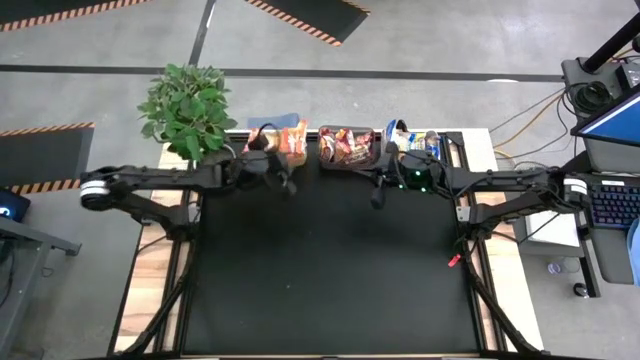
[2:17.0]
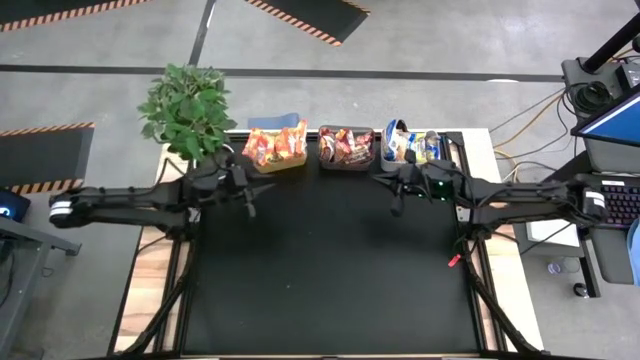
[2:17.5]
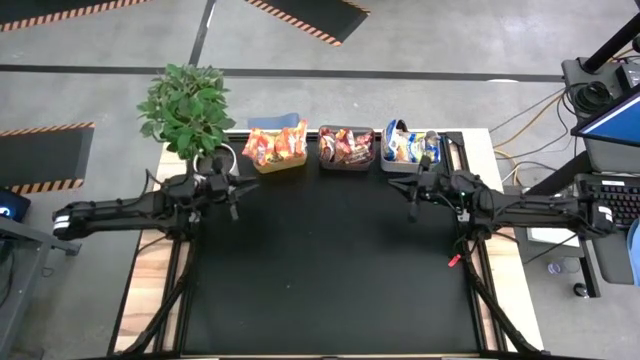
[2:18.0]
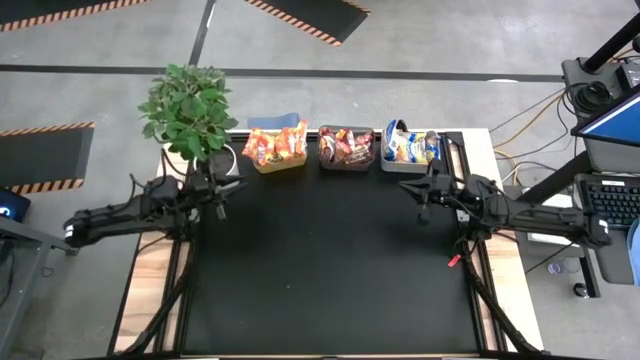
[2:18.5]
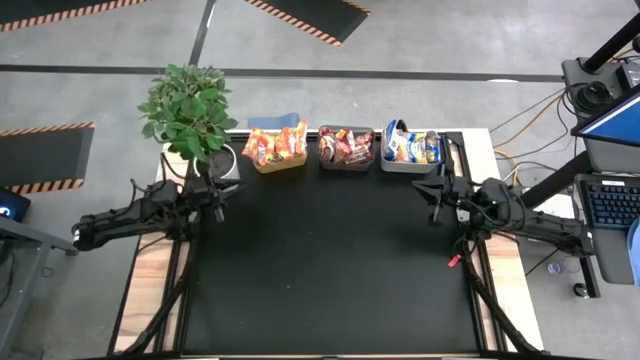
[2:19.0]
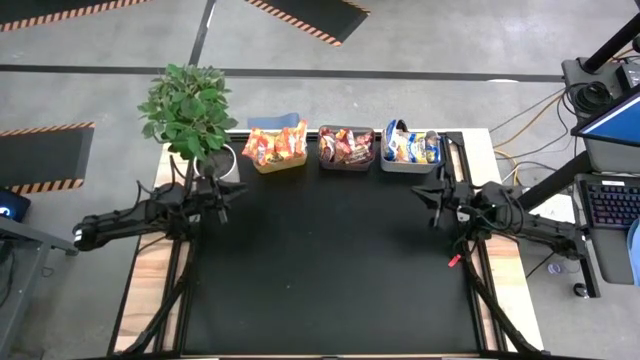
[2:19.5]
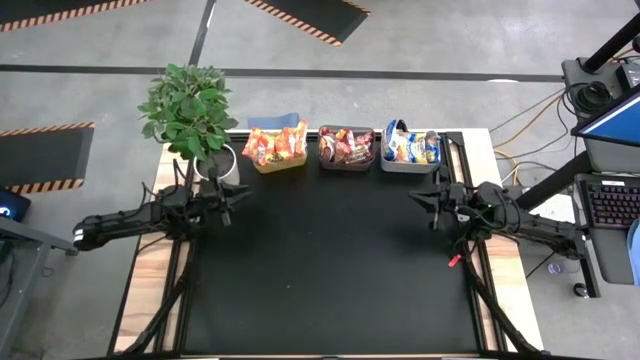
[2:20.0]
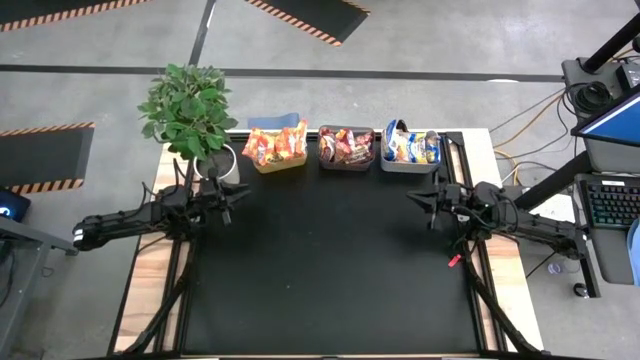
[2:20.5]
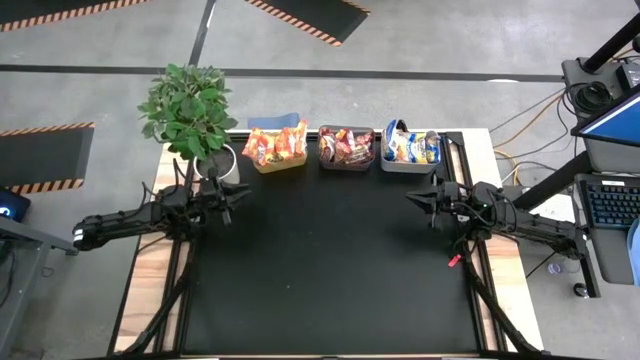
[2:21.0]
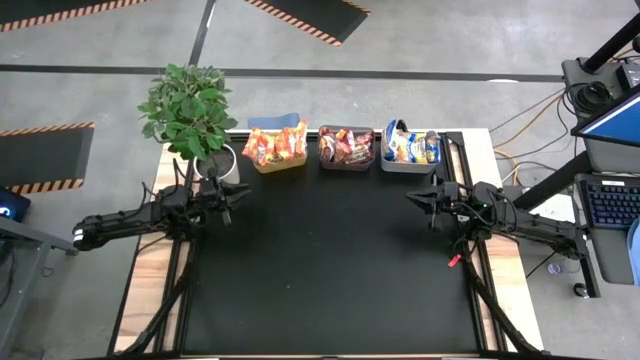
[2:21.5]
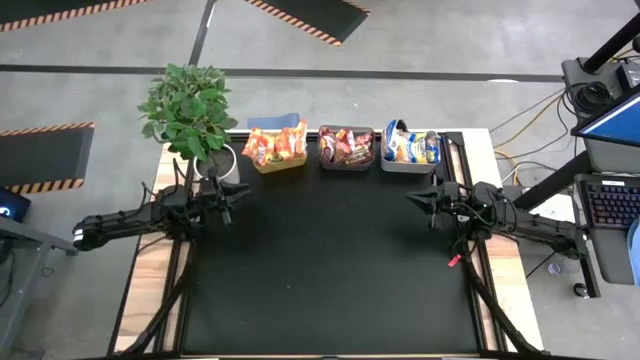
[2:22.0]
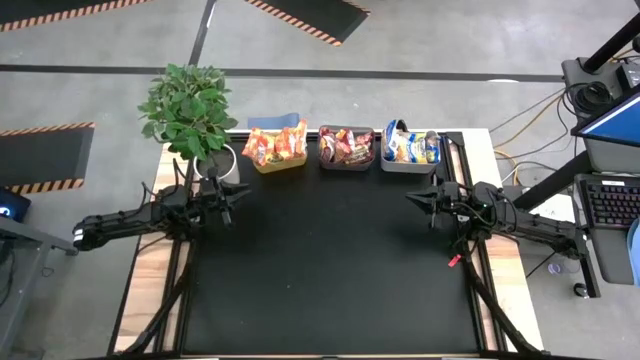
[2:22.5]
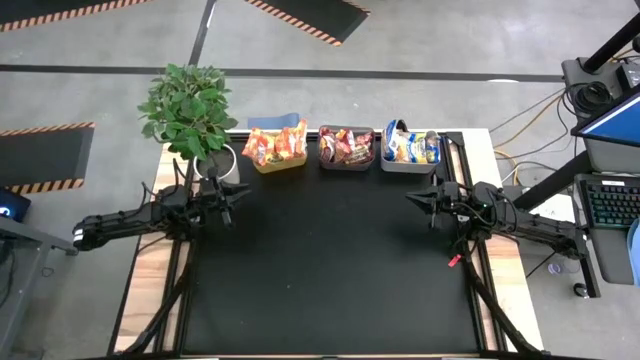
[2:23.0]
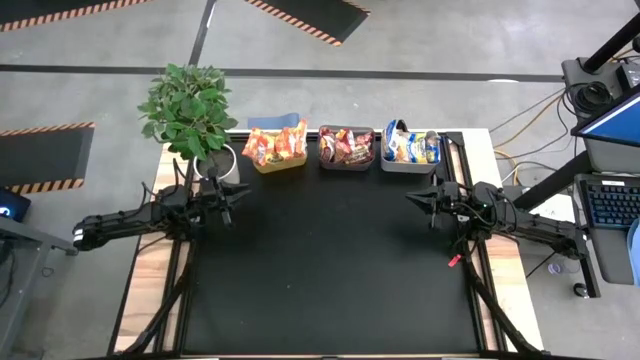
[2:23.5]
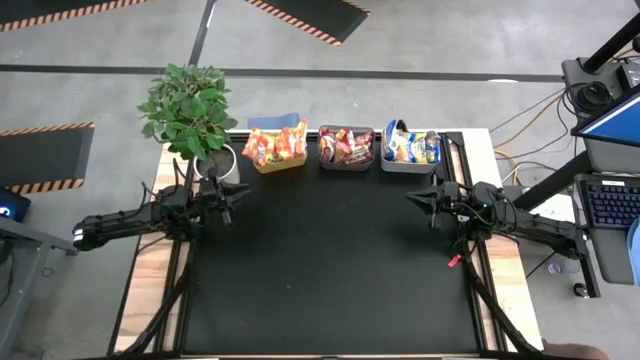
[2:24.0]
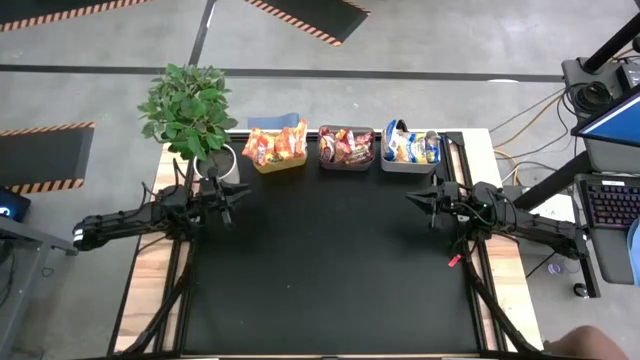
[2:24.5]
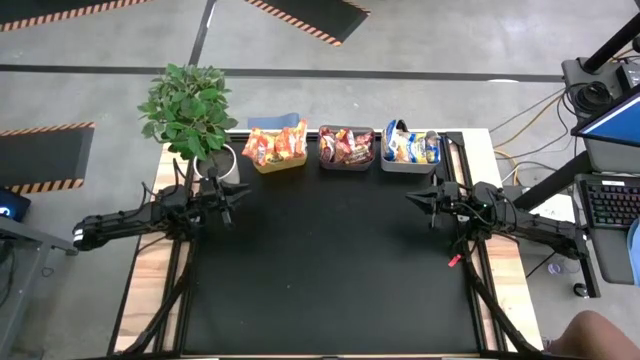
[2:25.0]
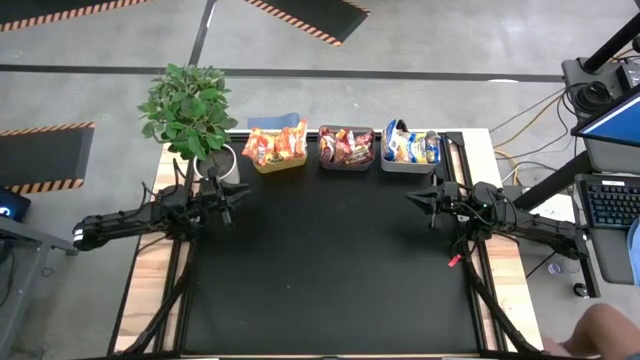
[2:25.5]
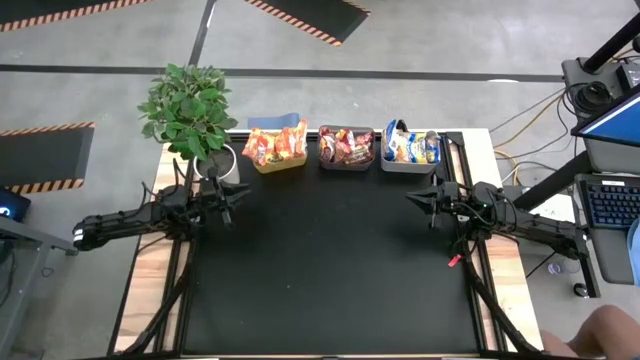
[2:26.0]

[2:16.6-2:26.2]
Task: Sort Maruchan noodles
Return to Home Position

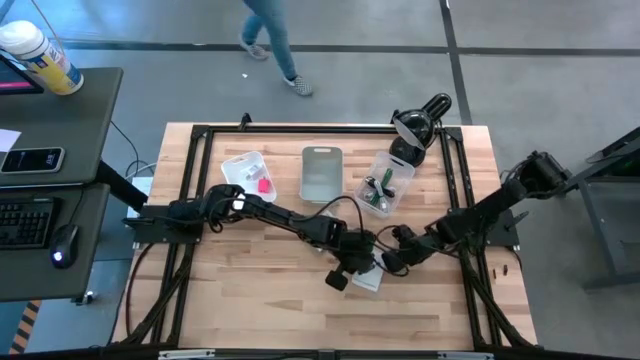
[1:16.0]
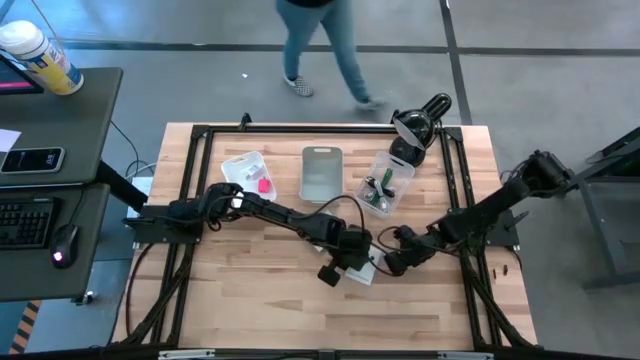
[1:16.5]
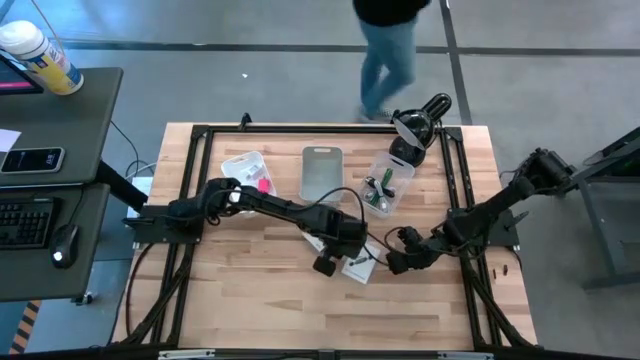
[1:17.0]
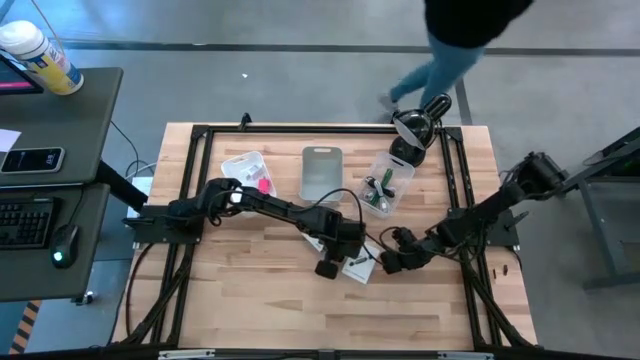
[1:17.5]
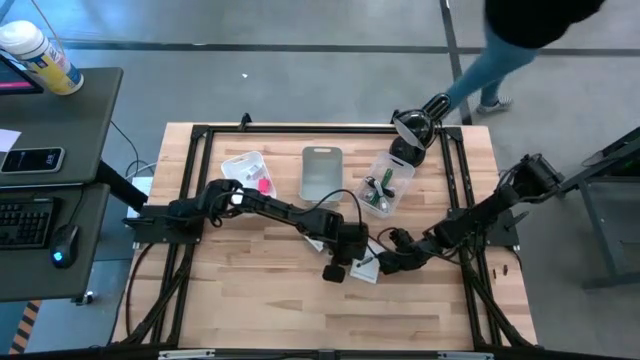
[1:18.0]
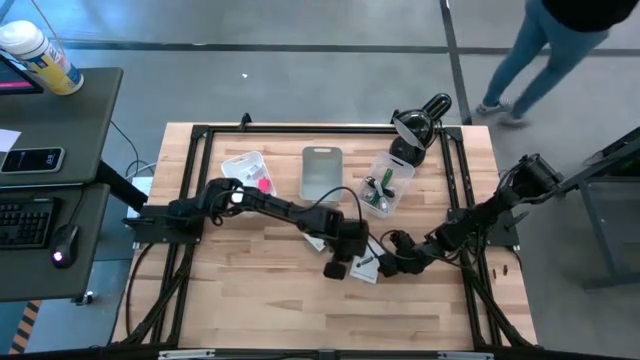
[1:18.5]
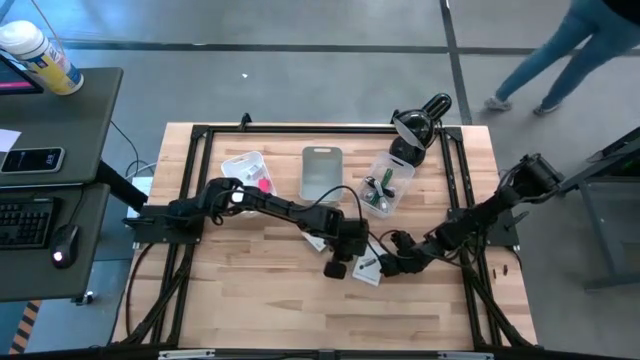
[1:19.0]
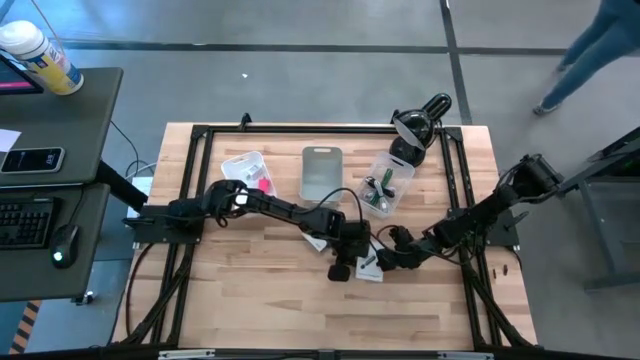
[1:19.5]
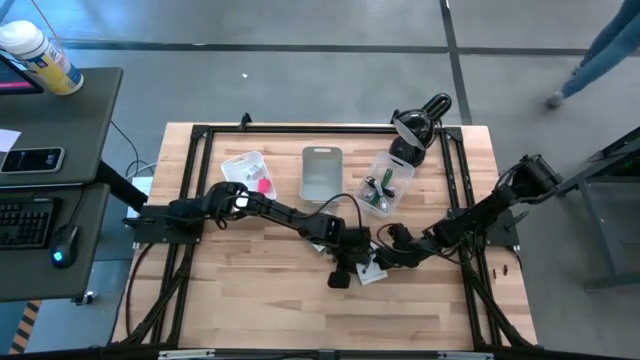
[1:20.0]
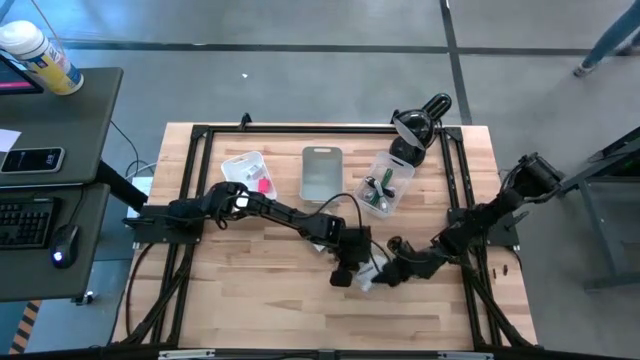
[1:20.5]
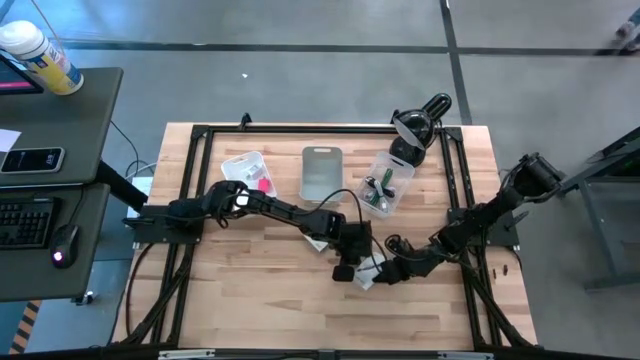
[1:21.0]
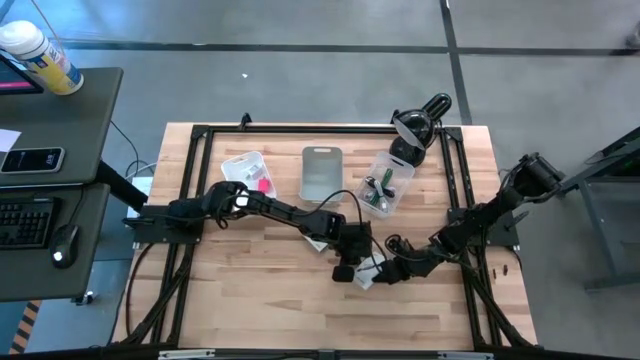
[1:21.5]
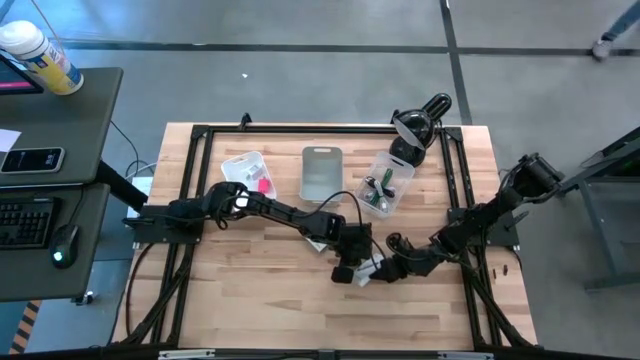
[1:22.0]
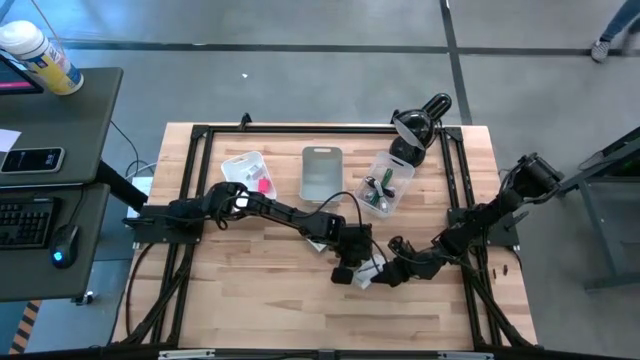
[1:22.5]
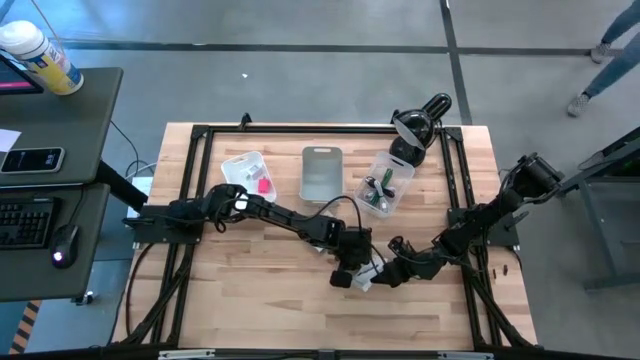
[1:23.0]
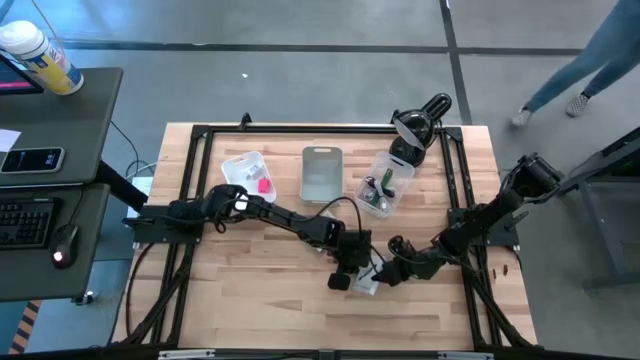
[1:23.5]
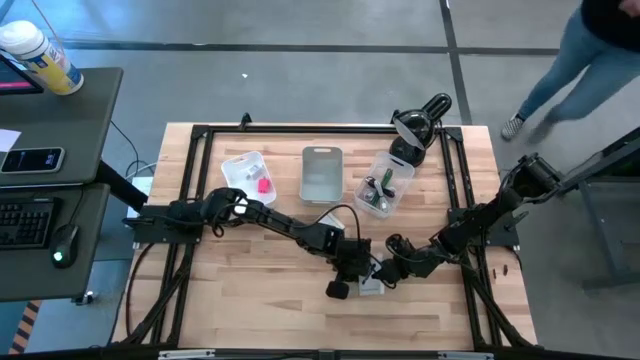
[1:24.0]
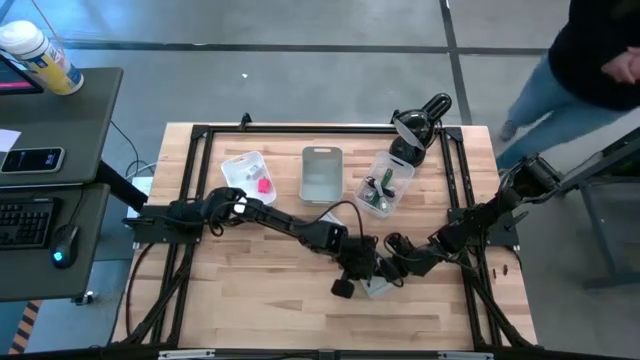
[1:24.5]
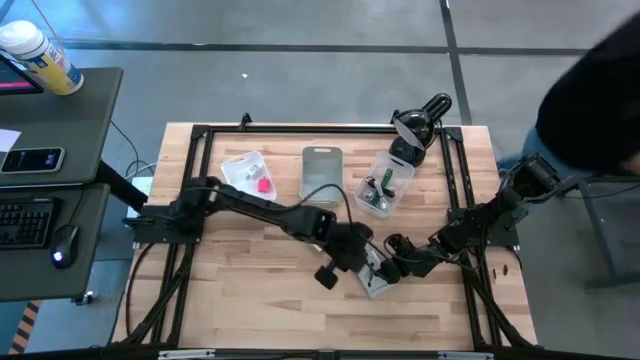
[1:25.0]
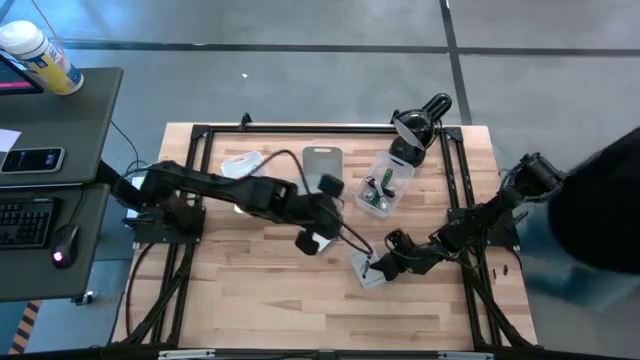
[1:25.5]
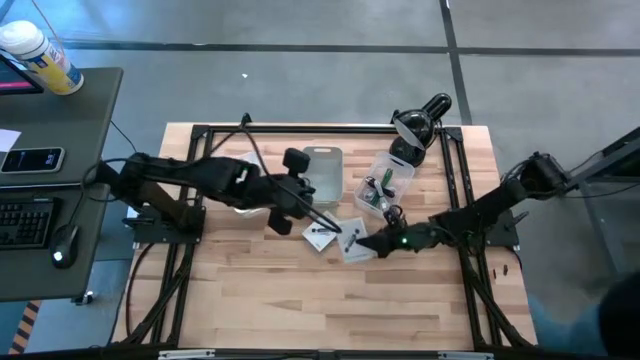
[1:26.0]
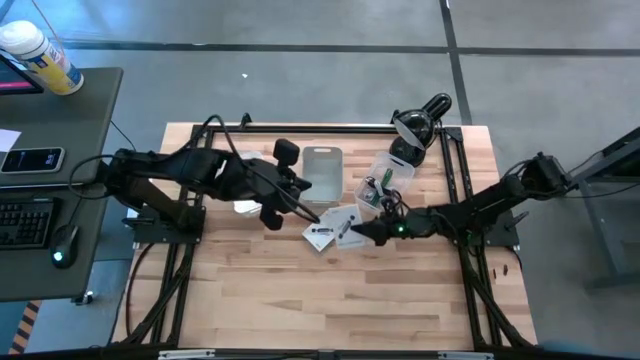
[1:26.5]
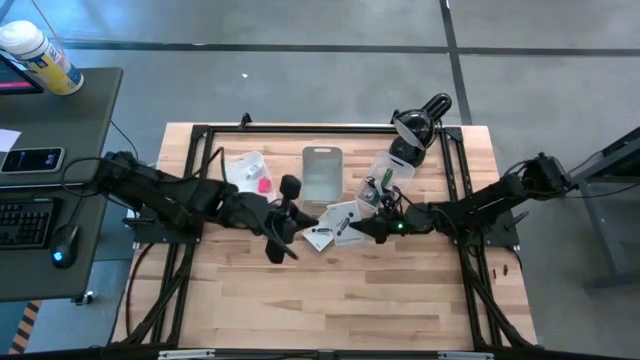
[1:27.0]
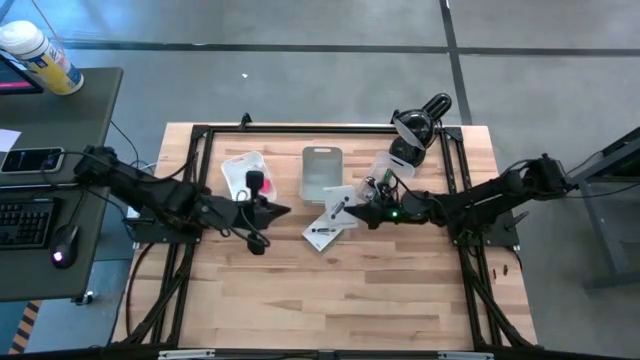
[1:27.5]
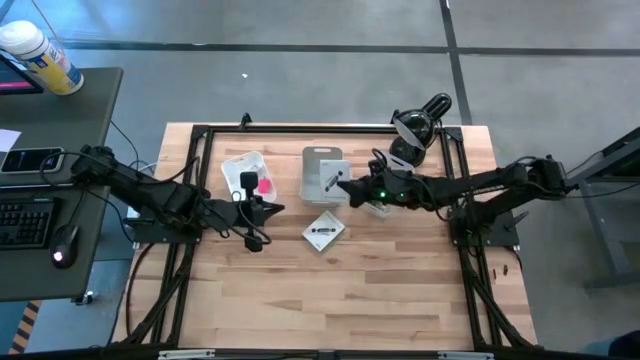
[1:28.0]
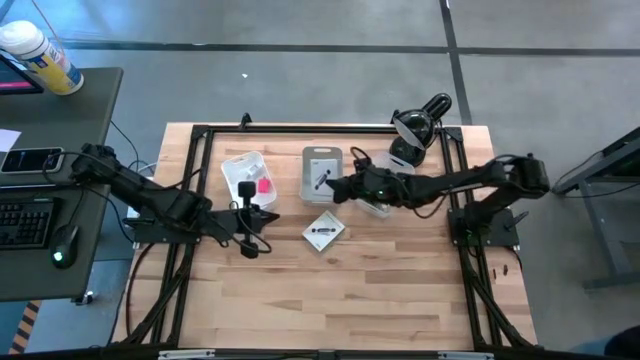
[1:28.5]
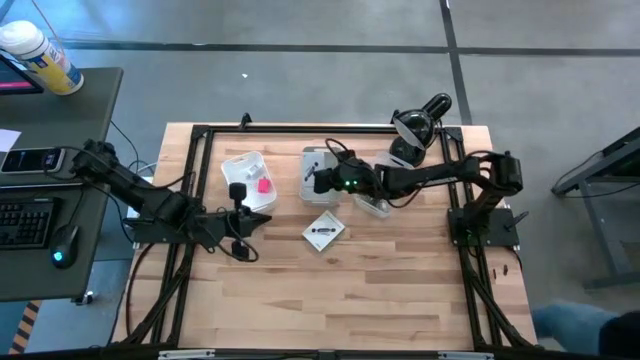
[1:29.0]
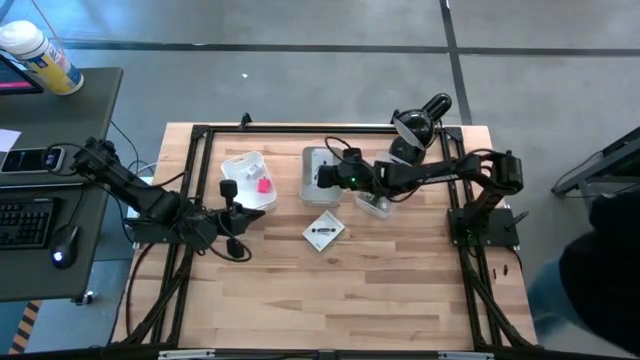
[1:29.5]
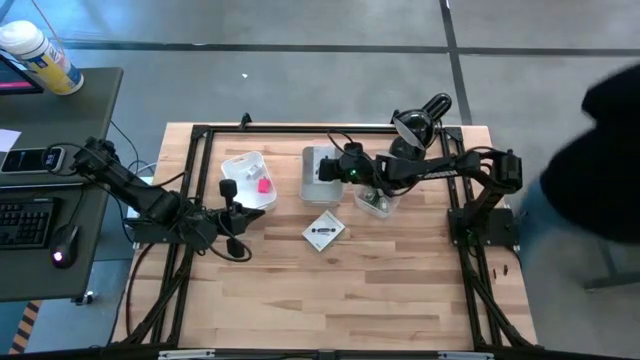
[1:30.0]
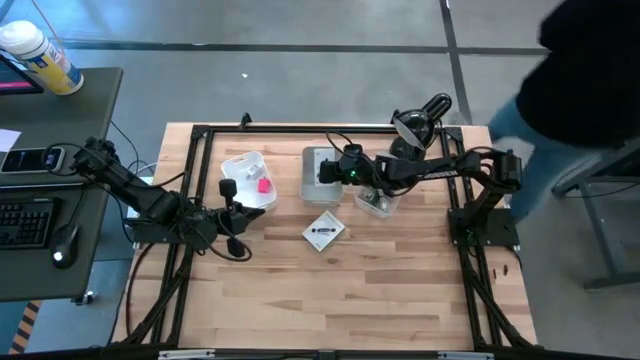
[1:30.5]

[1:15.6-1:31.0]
Task: Pick and place items into bin
Put the bottom white card reader box into the gray bin
